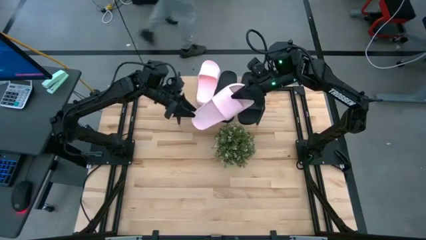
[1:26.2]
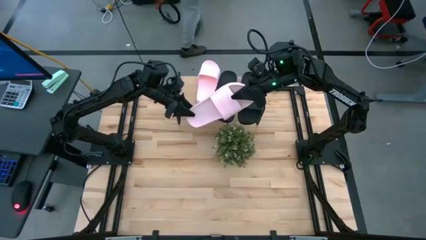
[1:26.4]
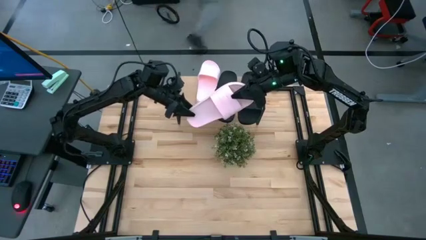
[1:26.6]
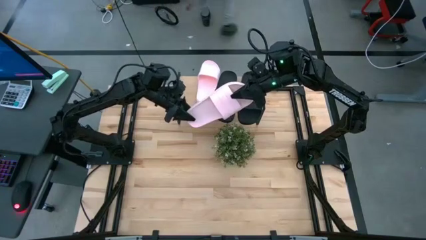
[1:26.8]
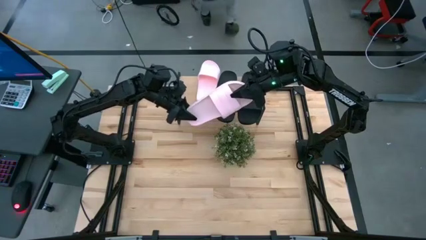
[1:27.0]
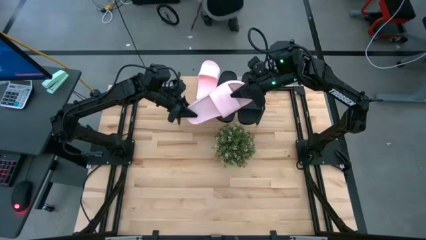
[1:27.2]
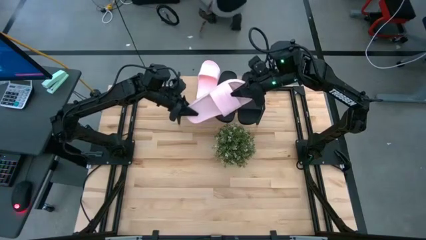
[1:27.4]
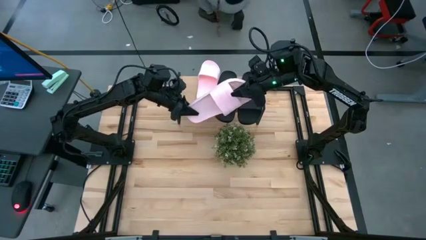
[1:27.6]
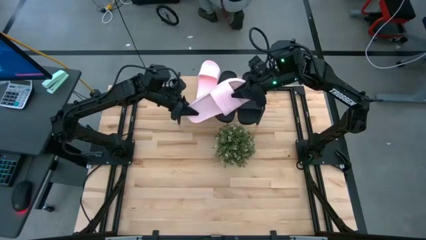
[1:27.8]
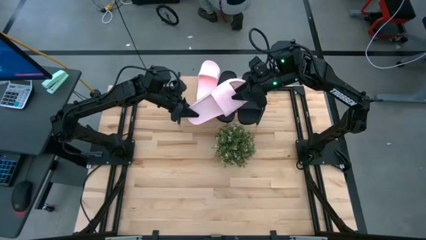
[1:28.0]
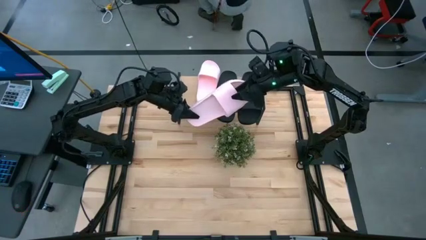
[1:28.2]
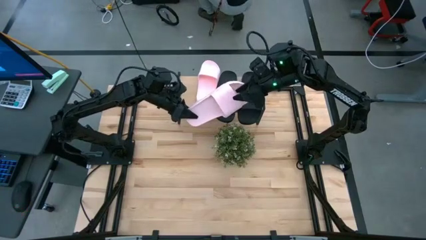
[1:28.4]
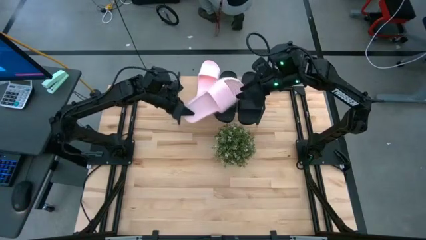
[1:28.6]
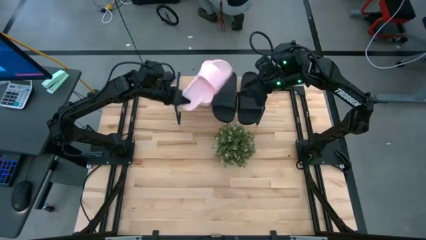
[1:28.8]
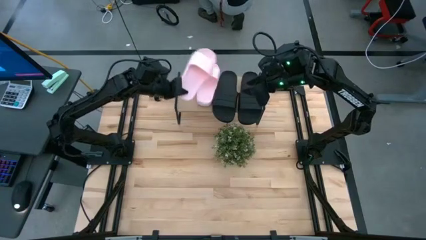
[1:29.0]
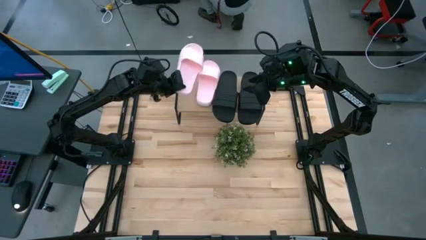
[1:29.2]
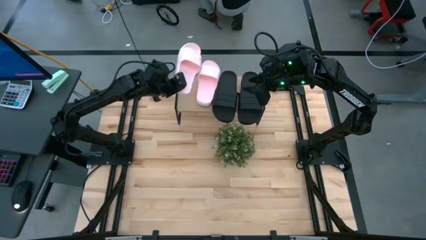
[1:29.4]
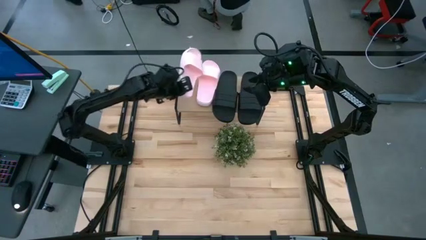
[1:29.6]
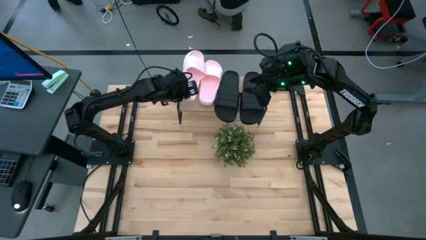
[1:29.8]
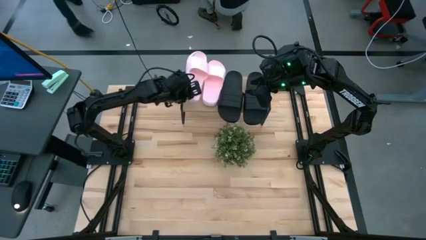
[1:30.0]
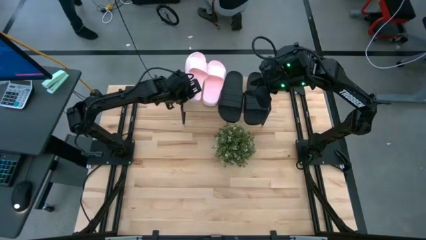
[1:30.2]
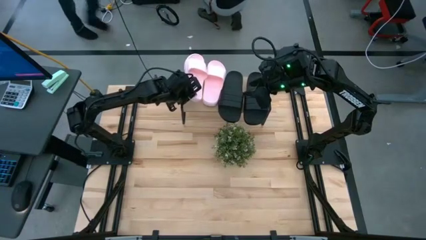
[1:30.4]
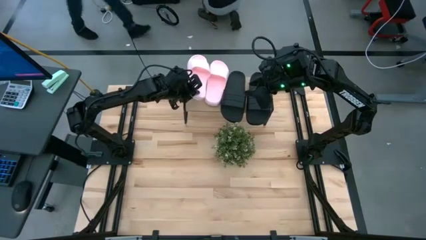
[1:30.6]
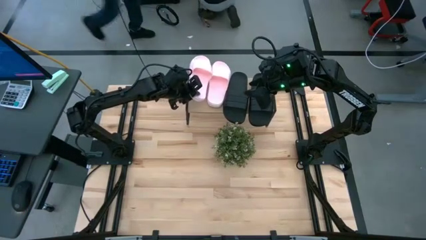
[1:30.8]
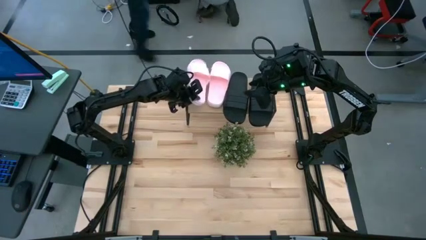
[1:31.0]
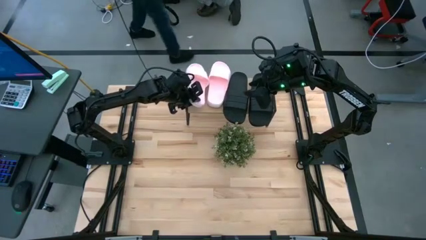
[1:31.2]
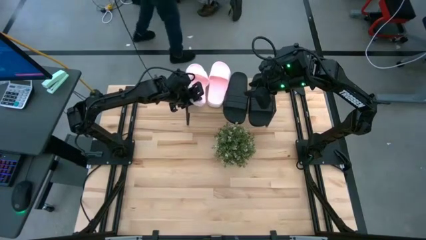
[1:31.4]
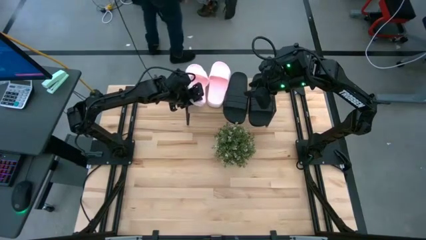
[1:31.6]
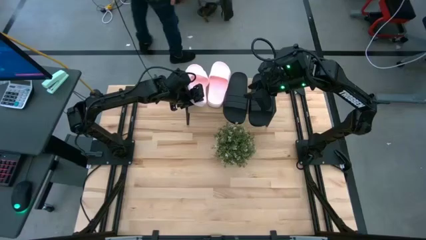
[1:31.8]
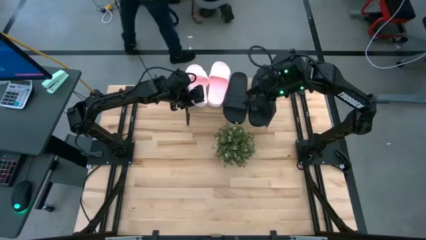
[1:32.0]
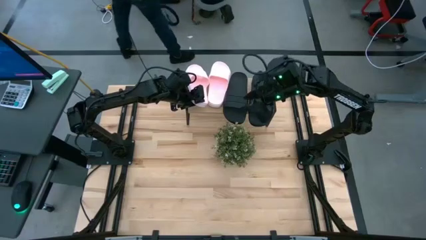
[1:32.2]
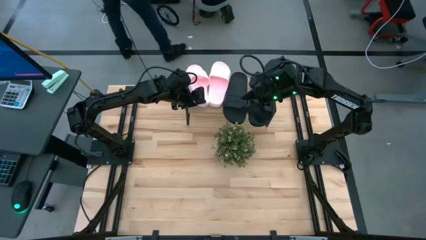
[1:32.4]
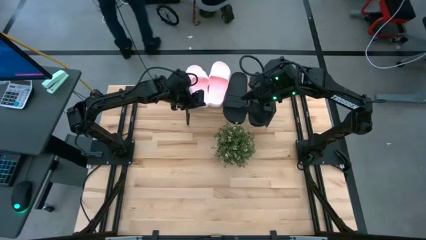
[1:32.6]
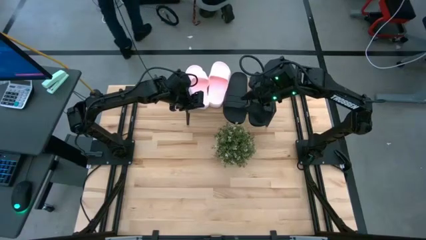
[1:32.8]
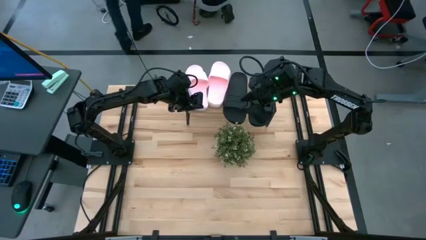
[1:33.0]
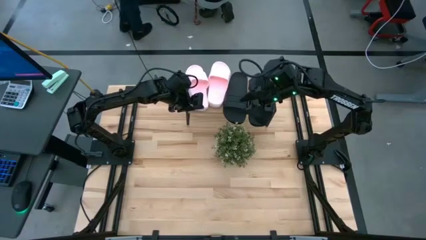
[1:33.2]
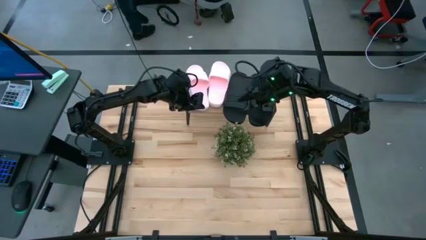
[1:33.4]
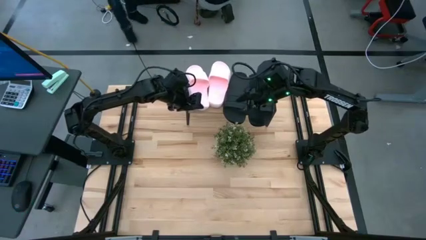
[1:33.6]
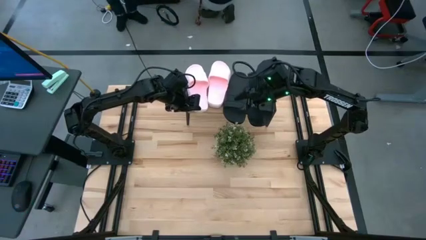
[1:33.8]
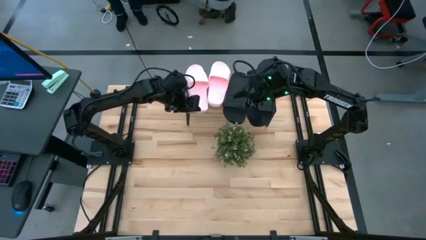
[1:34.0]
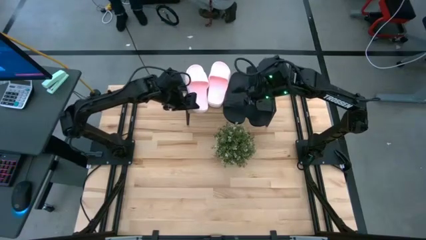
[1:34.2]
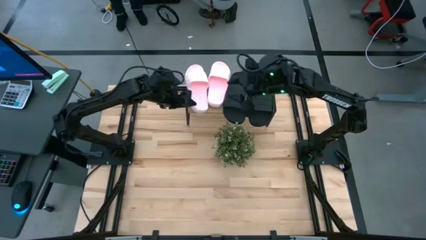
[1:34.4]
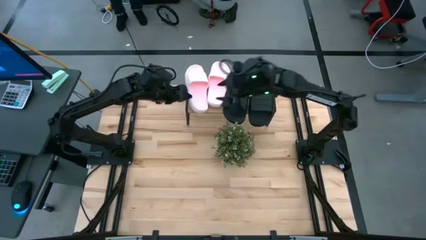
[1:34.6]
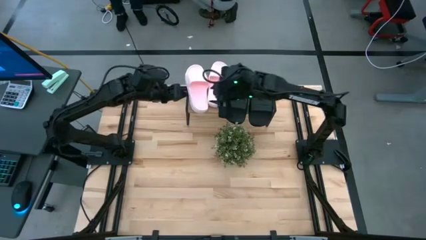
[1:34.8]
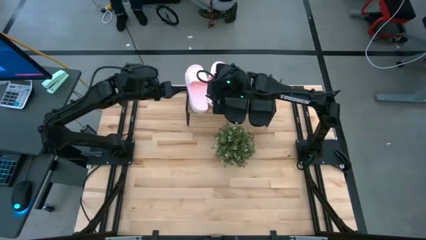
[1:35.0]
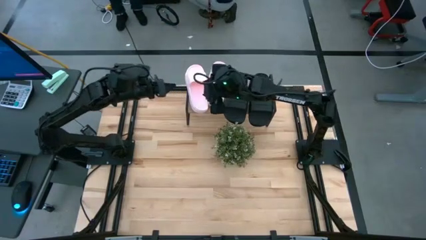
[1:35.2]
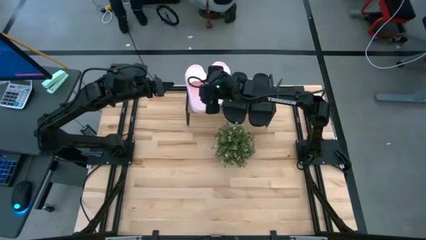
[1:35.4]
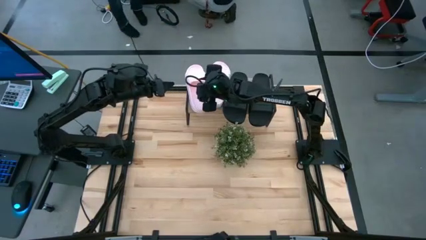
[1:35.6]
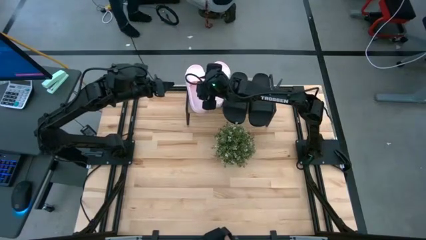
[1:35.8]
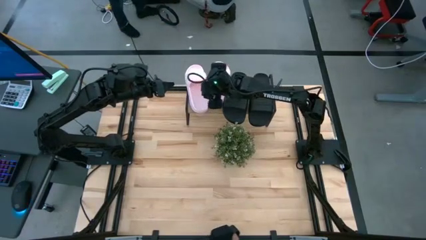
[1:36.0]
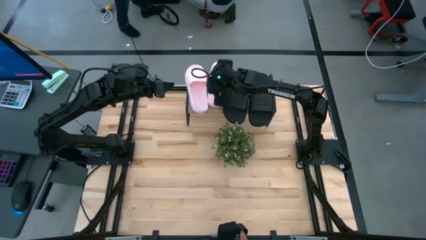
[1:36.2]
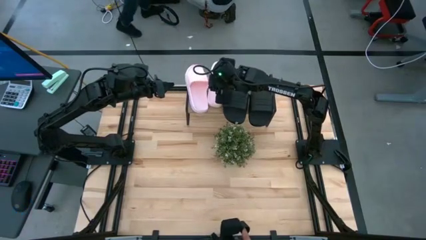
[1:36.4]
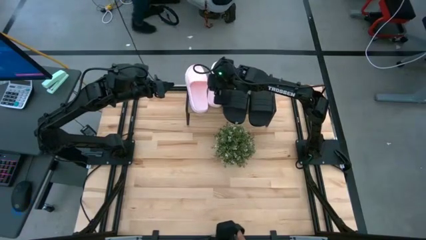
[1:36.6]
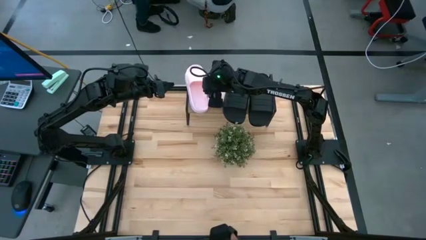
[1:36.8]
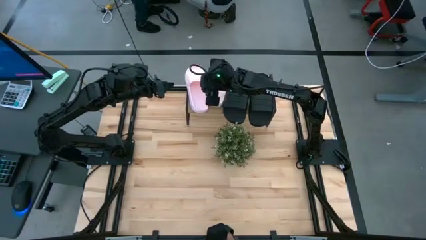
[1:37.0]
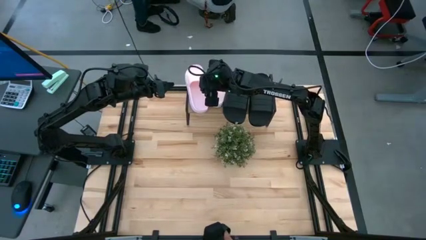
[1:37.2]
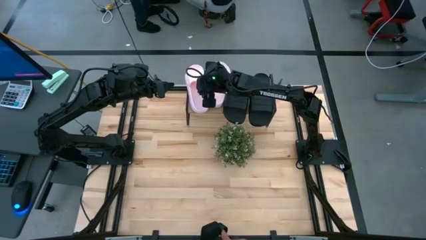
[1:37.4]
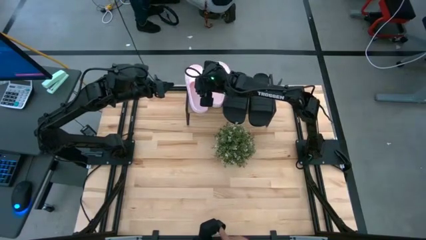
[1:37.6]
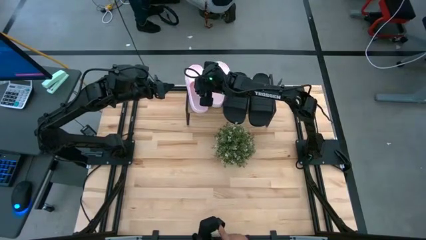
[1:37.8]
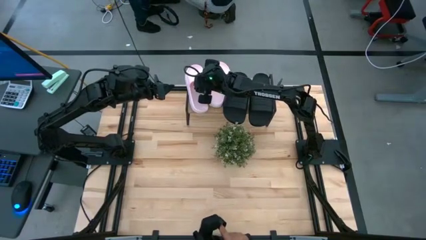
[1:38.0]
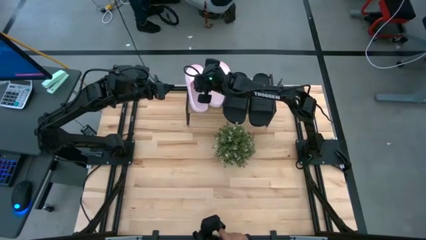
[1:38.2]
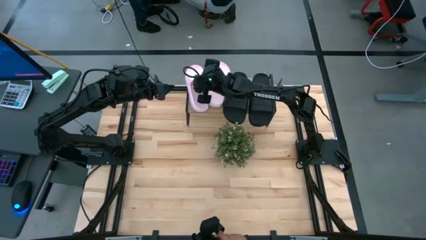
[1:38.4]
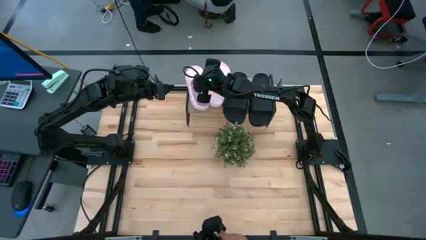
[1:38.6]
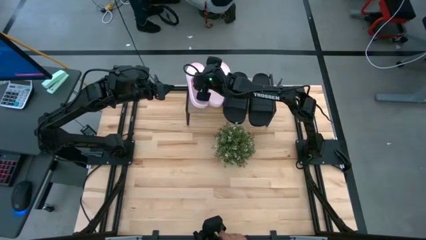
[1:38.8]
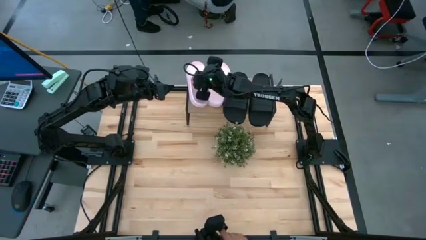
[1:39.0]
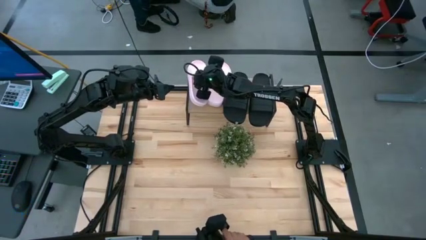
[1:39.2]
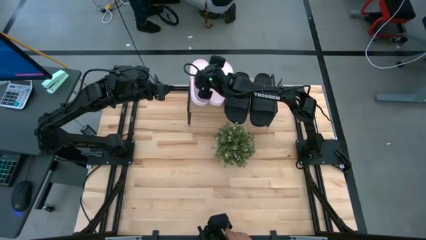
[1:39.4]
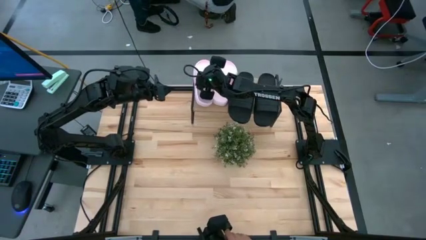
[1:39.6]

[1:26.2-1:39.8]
Task: Pick and place slides into the shelf
Put the pink slipper on the shelf
